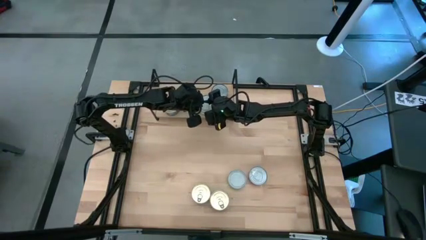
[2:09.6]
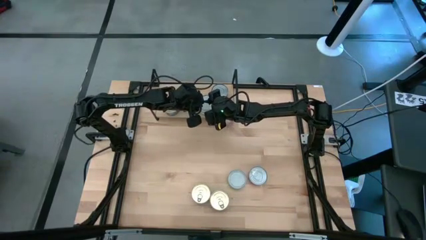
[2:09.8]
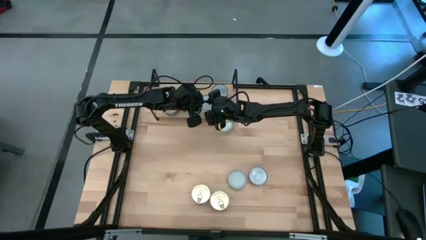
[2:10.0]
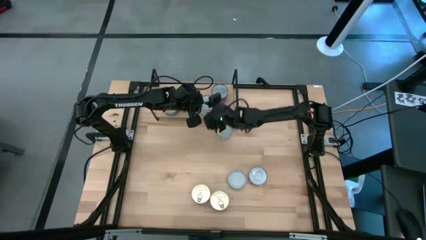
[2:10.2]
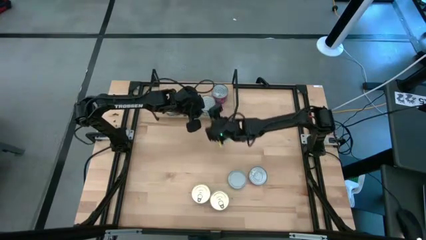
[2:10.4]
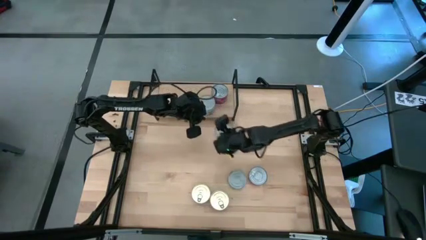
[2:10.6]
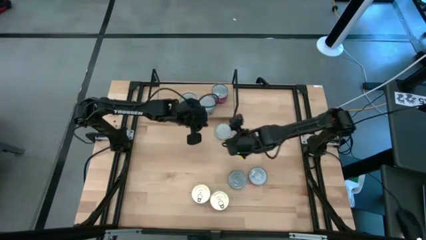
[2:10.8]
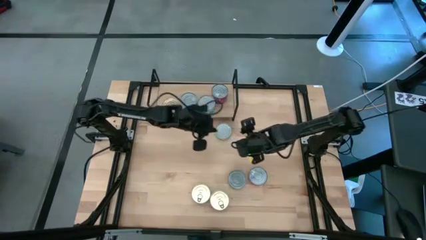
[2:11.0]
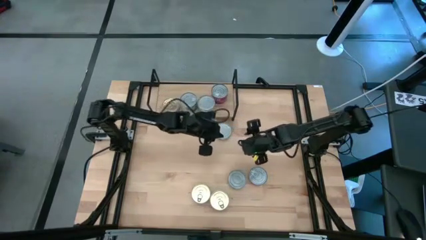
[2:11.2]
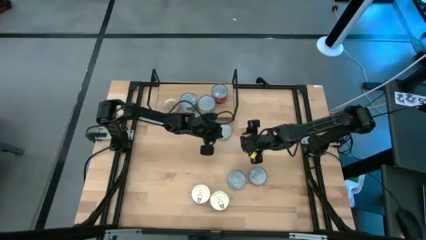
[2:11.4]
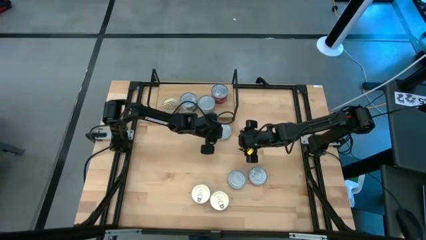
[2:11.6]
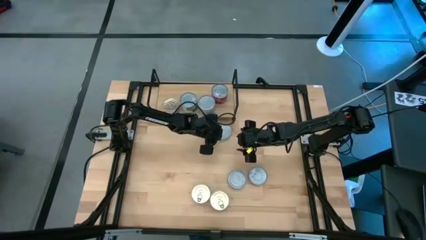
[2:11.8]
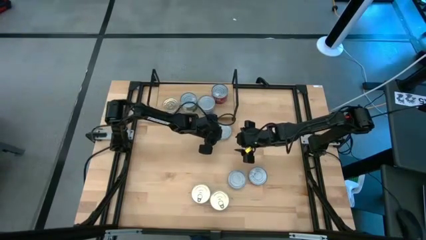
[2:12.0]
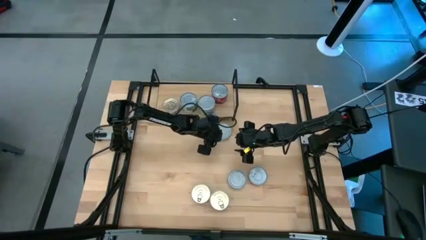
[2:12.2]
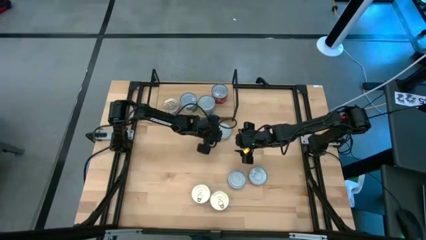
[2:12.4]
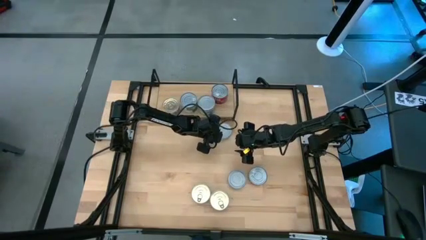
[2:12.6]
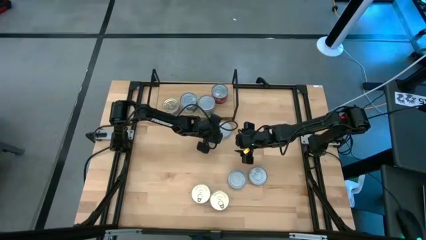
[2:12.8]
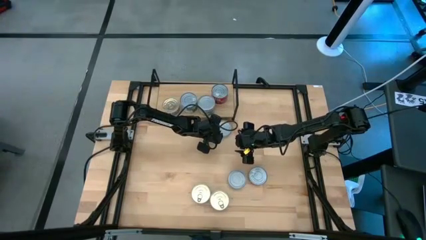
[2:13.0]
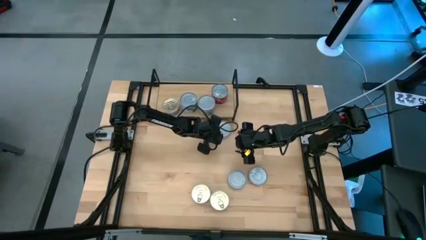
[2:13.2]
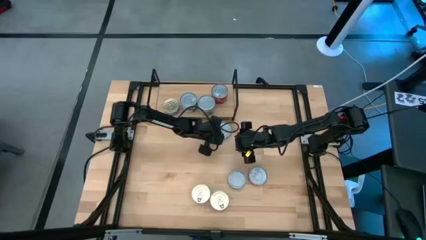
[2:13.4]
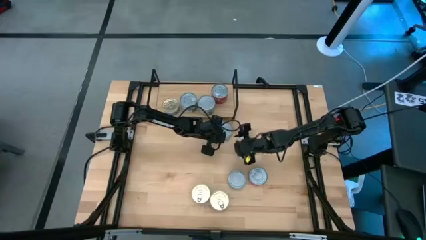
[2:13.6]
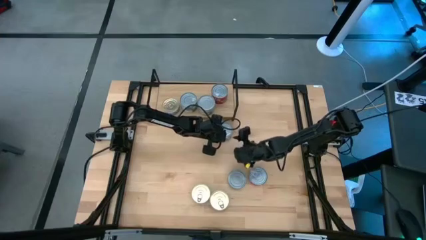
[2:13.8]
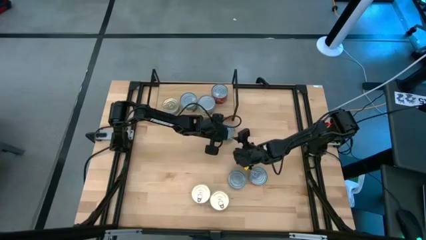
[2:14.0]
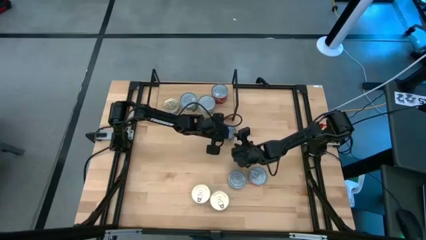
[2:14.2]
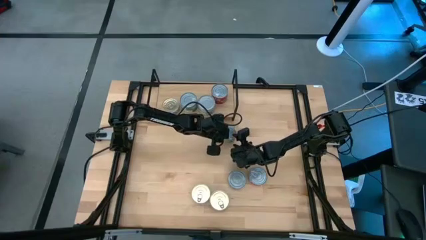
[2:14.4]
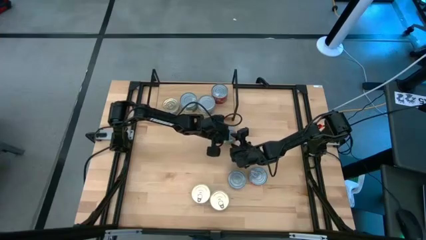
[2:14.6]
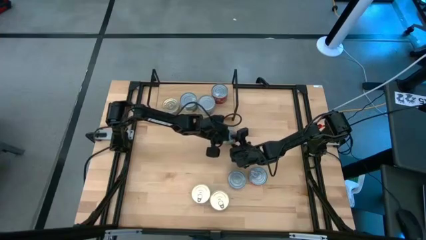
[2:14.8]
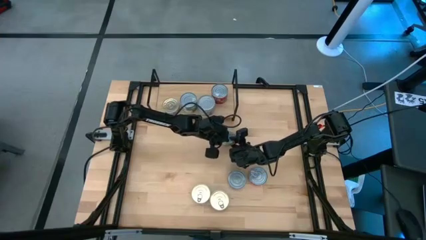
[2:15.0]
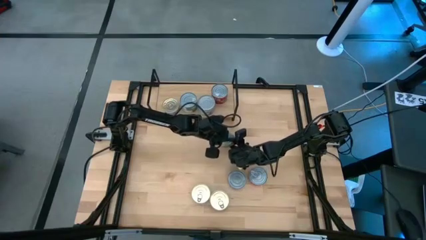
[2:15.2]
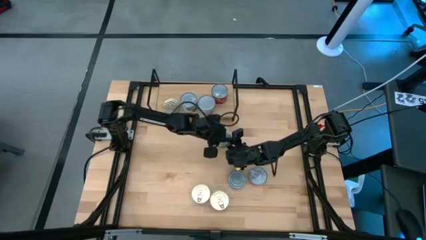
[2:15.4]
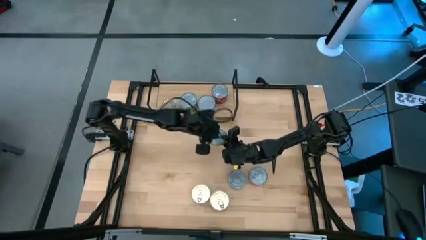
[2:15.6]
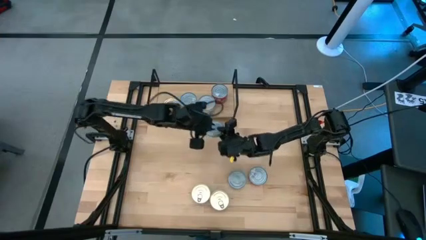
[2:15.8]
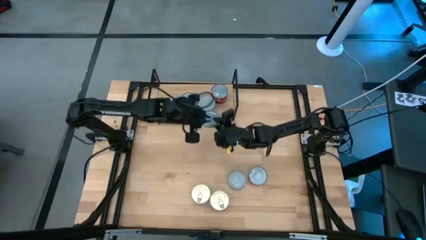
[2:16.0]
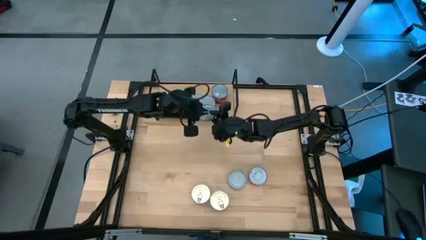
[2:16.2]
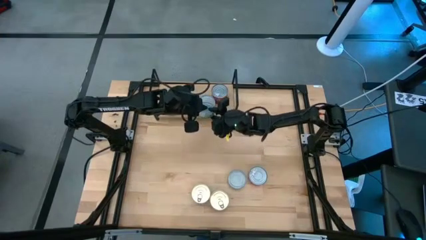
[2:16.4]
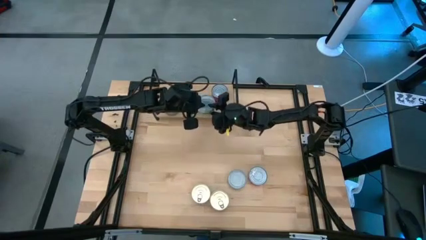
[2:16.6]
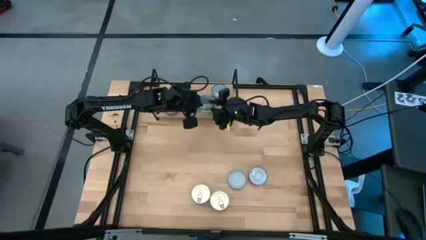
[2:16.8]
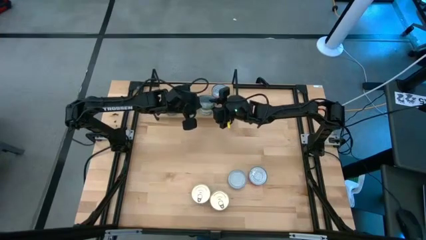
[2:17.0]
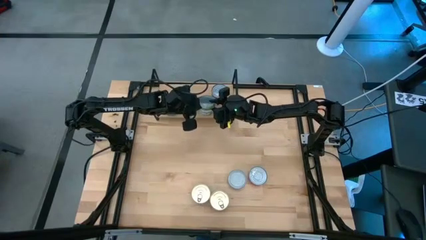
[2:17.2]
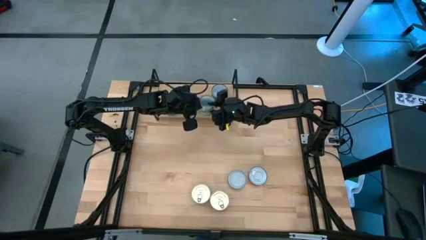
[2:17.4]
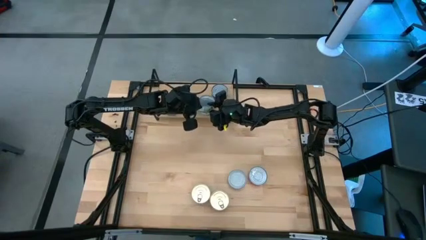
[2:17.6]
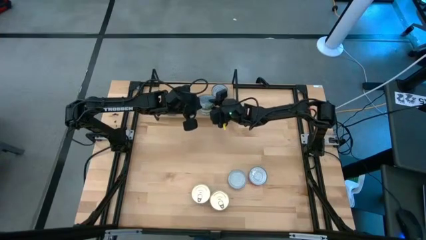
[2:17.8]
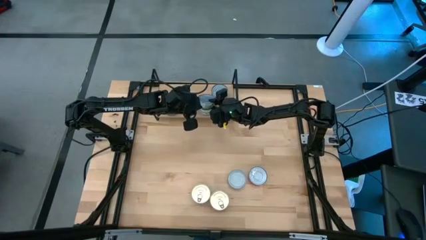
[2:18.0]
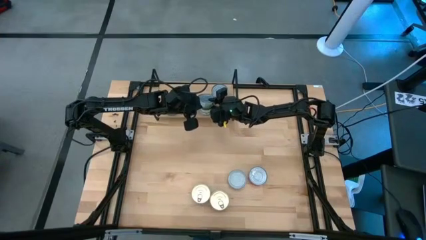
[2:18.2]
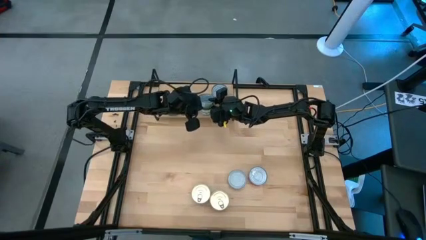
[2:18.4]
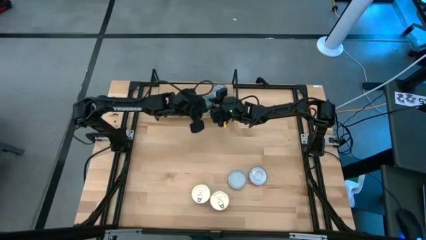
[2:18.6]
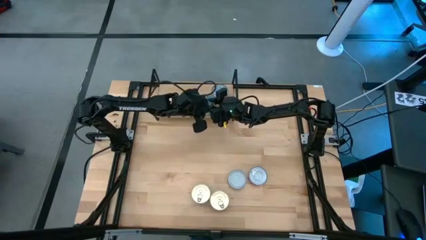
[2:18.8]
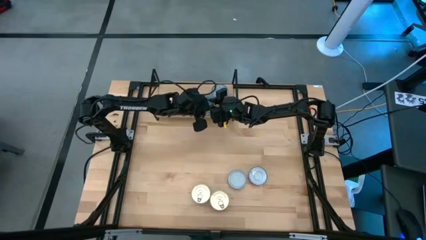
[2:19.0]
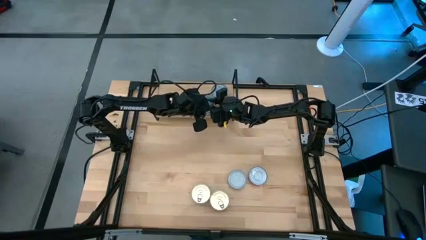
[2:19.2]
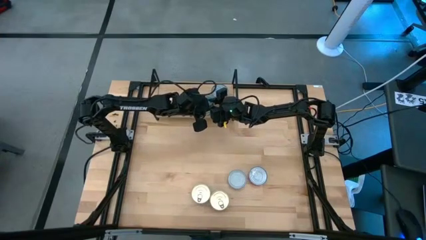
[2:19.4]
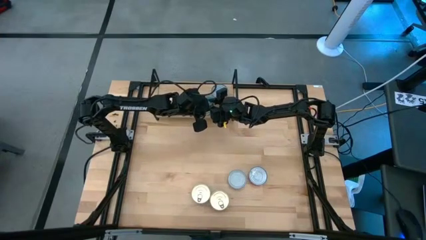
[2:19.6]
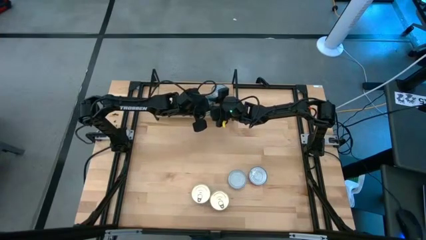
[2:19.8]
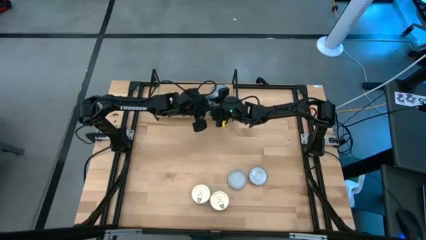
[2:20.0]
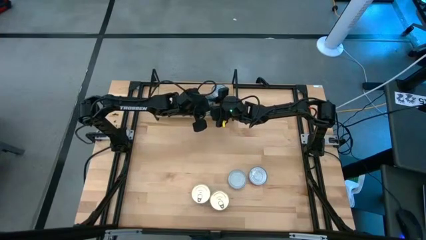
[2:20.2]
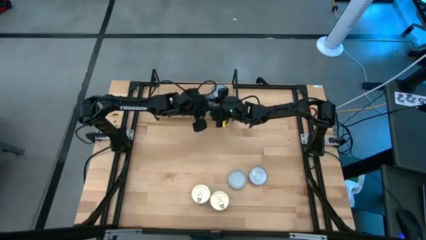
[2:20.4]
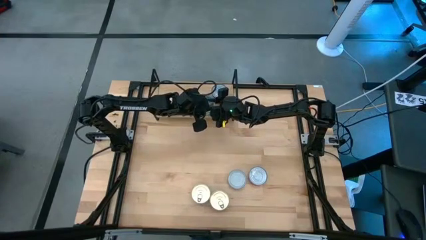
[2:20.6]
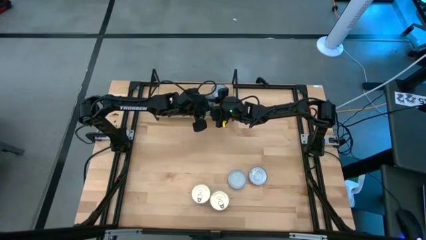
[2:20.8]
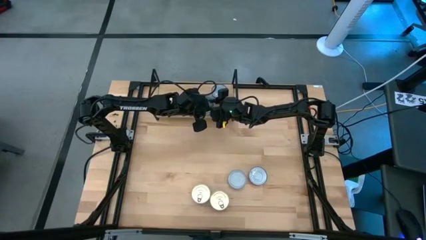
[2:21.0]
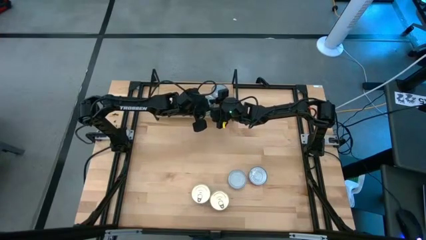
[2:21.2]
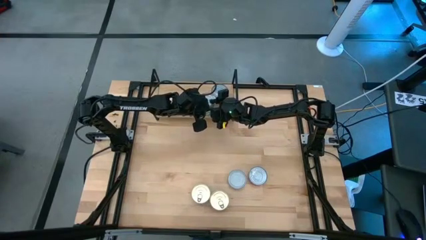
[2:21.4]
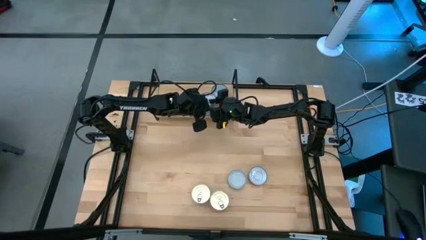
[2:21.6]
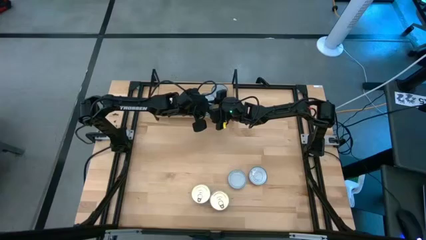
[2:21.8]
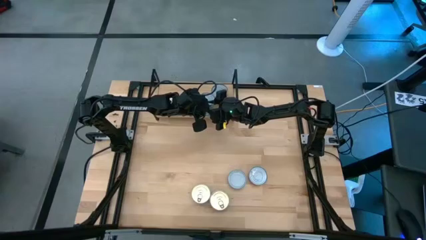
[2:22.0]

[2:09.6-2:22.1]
Task: Stack canned seafood by type on shelf
Stack the green white tuna can on top of the other green white tuna can on the shelf

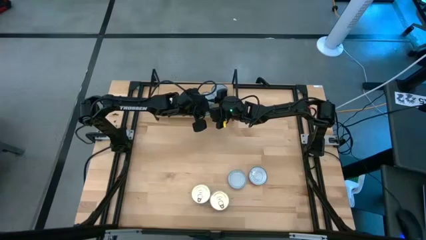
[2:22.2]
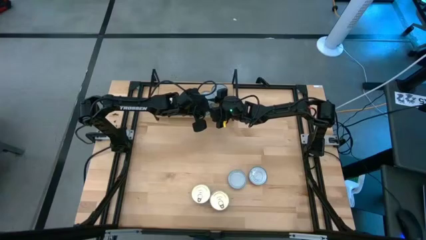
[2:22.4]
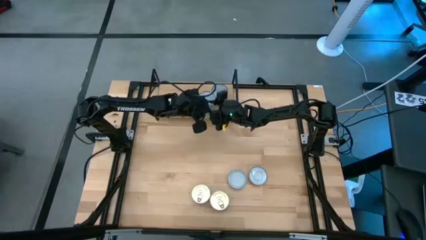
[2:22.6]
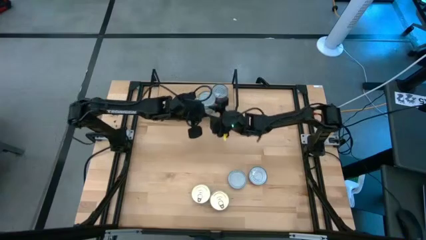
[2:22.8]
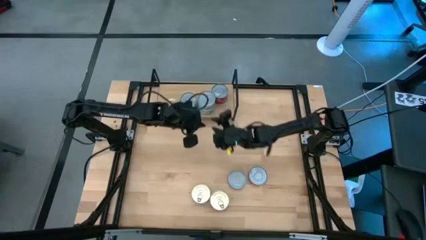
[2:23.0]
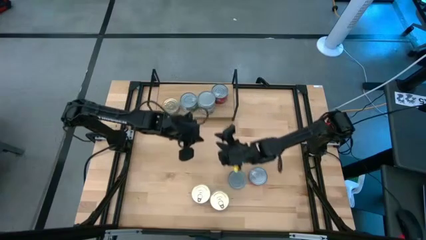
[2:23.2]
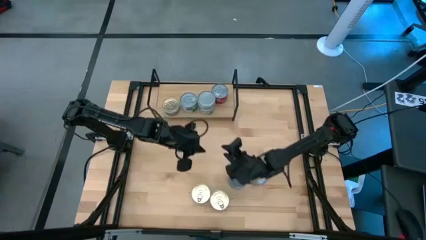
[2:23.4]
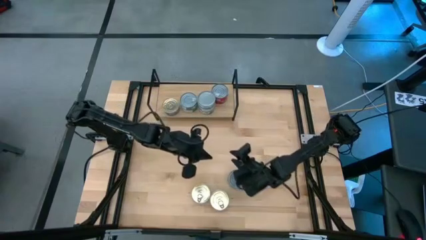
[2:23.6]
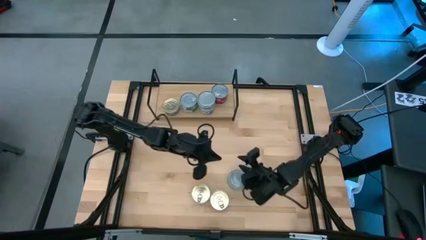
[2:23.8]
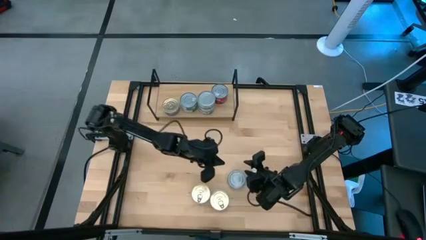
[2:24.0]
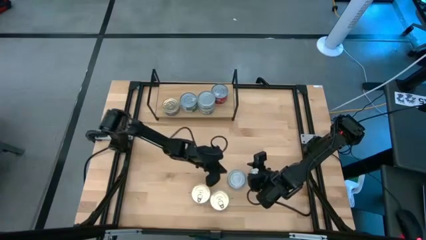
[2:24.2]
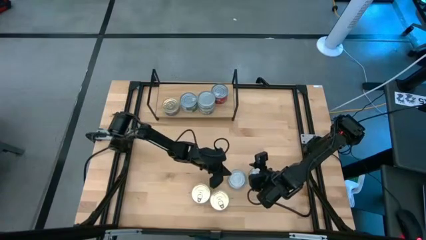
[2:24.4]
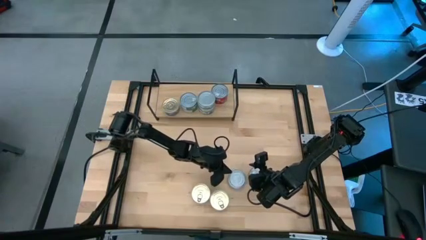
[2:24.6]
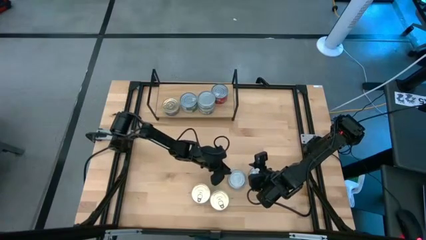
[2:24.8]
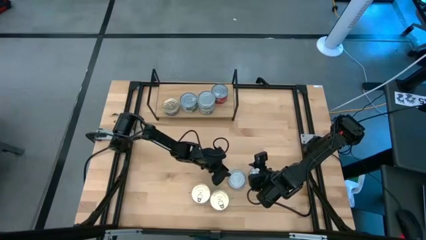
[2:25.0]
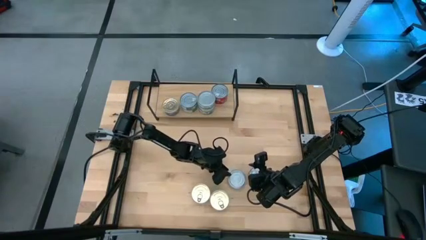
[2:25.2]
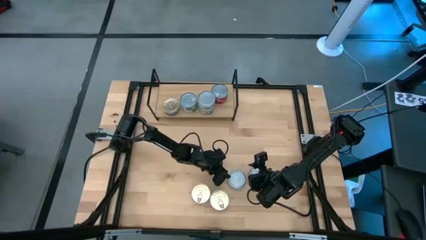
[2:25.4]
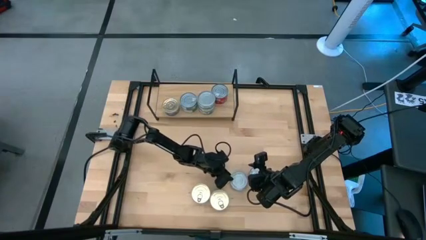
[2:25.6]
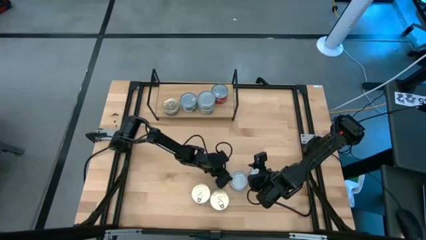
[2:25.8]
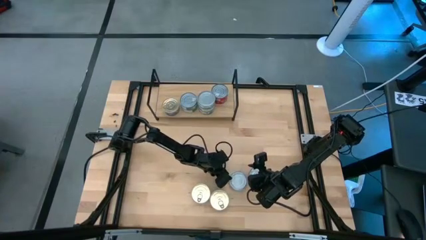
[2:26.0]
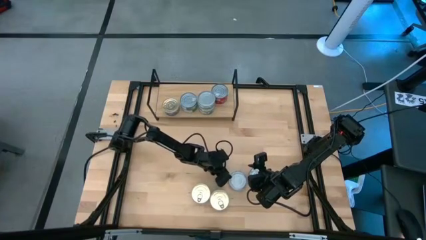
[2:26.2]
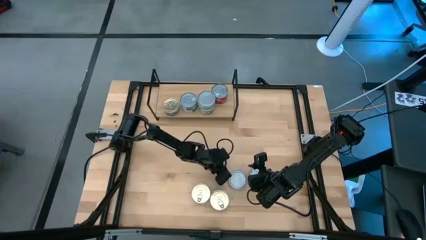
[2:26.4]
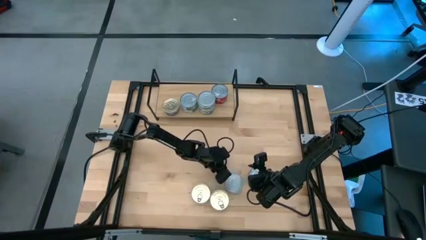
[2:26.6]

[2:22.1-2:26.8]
Stack the green white tuna can on top of the other green white tuna can on the shelf
